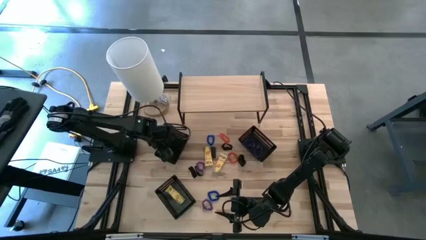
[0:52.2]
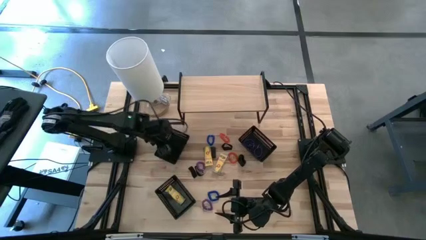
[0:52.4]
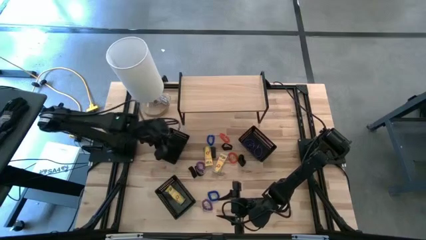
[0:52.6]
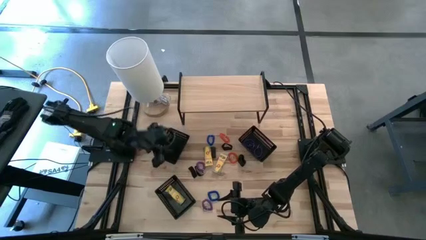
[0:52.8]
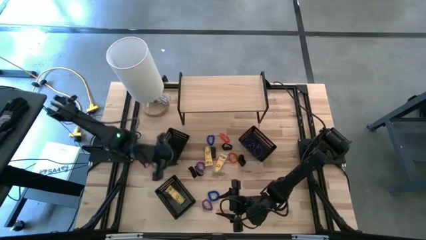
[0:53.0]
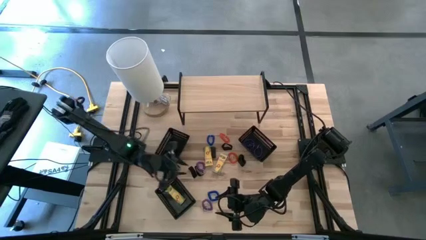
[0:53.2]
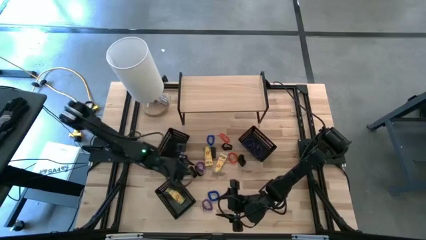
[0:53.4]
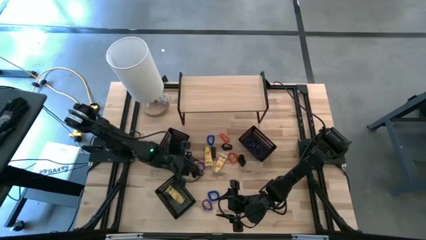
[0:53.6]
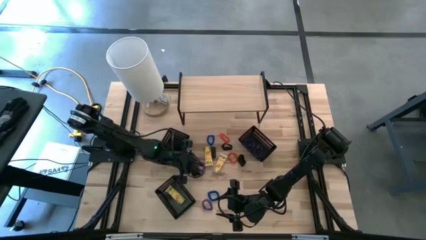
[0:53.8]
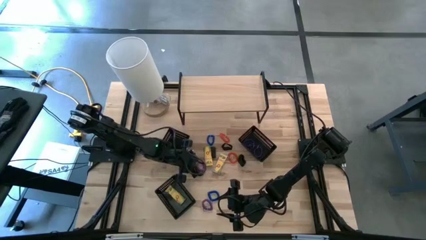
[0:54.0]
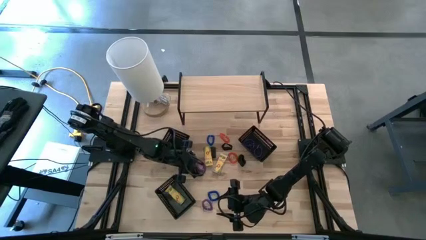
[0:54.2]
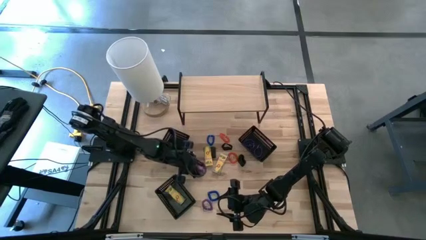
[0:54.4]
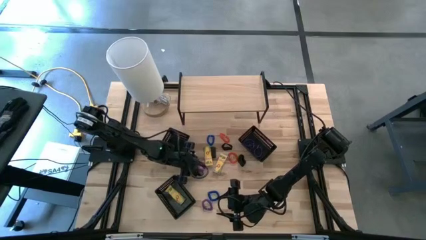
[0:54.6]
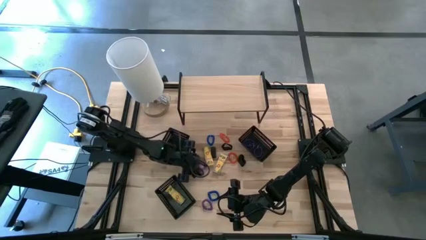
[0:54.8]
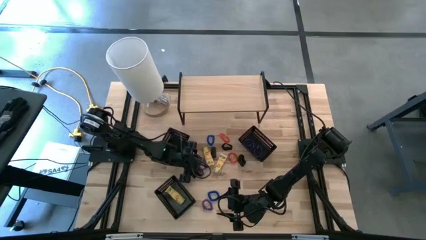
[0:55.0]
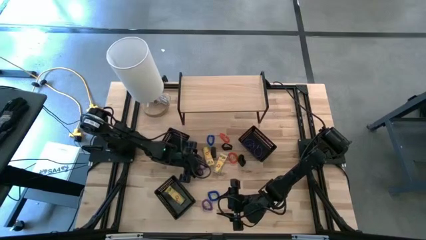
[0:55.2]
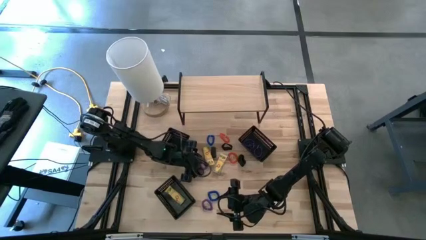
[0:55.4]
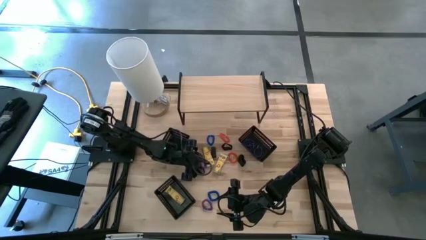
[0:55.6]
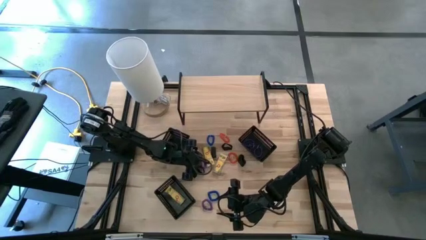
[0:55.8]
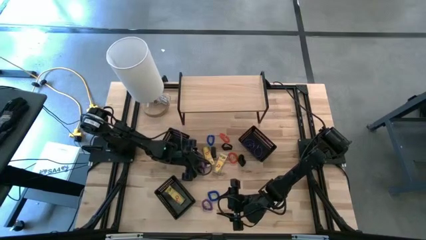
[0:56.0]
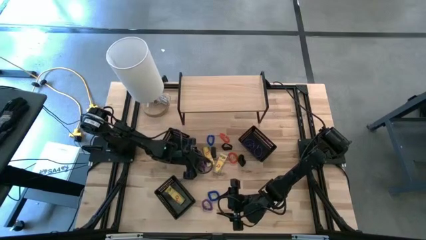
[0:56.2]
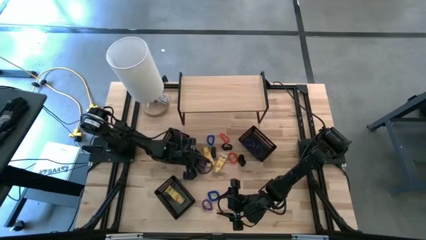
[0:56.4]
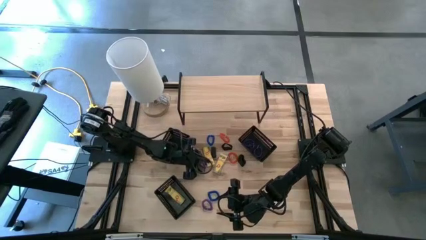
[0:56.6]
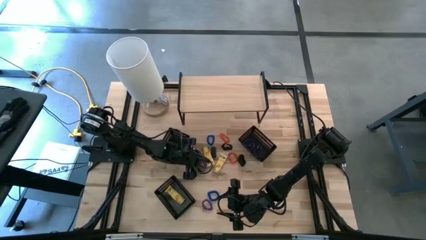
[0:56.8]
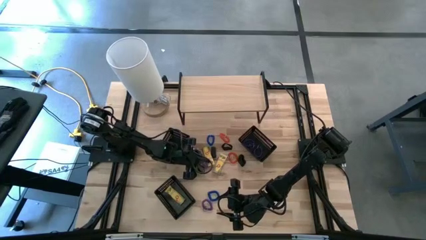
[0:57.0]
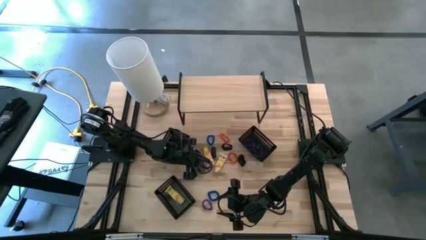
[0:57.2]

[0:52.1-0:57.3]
Task: Pick & Place Office Desk Supplies
Put the top purple spring keychain into the top right black bin

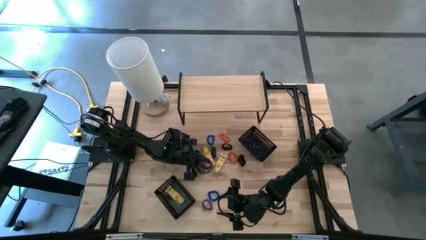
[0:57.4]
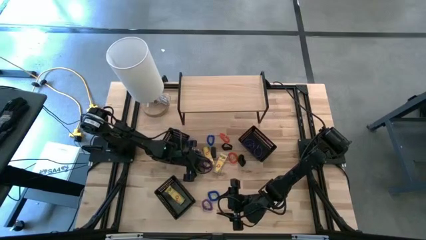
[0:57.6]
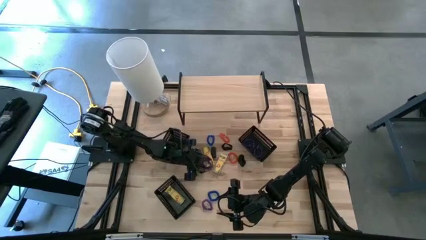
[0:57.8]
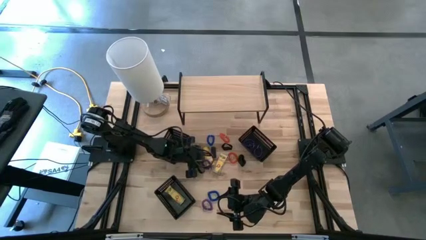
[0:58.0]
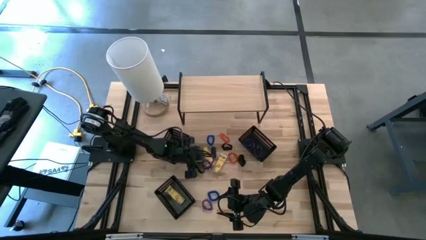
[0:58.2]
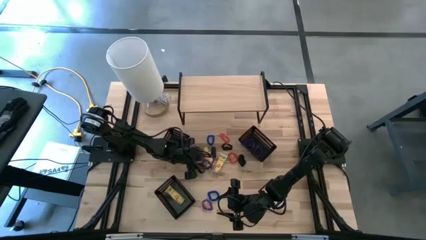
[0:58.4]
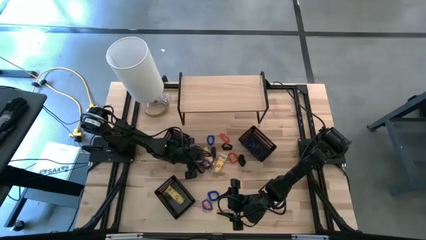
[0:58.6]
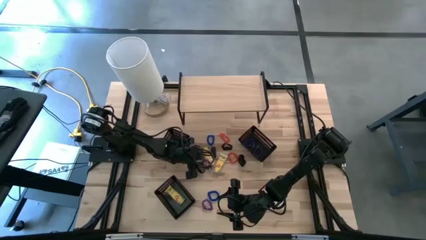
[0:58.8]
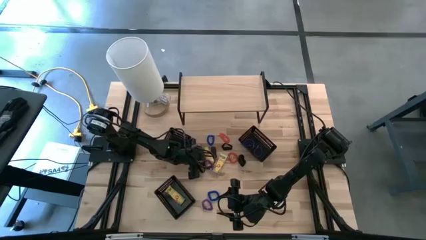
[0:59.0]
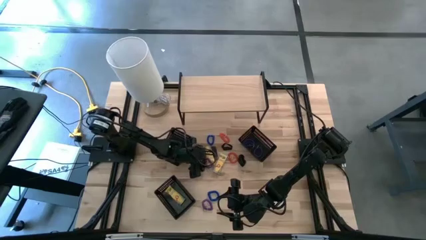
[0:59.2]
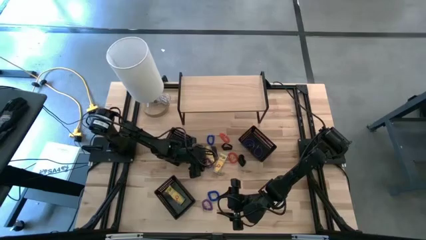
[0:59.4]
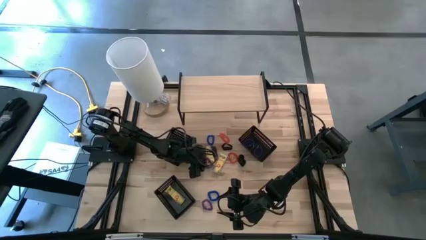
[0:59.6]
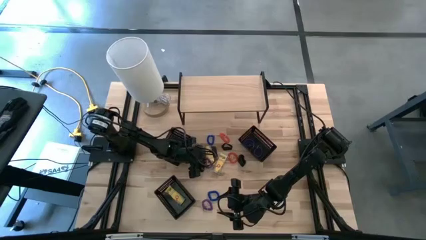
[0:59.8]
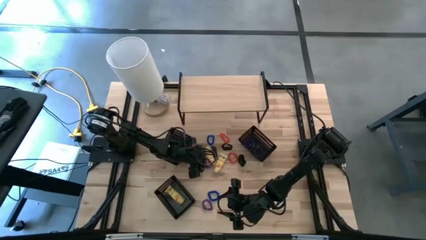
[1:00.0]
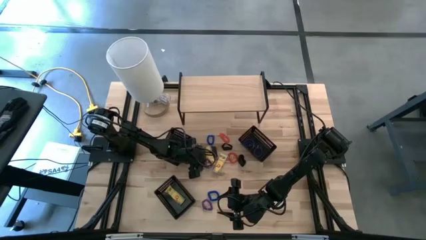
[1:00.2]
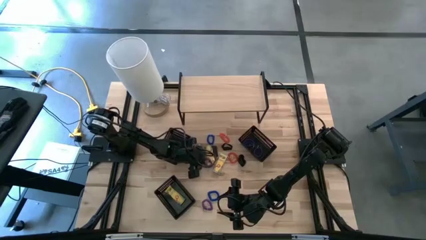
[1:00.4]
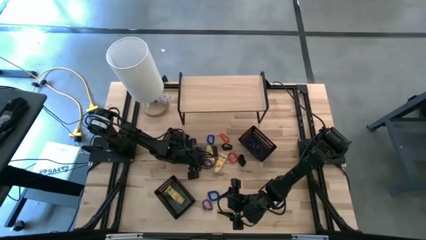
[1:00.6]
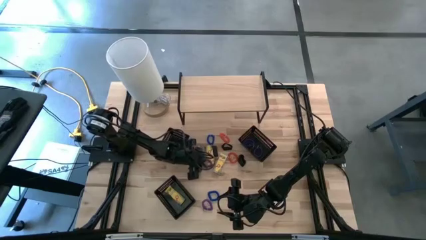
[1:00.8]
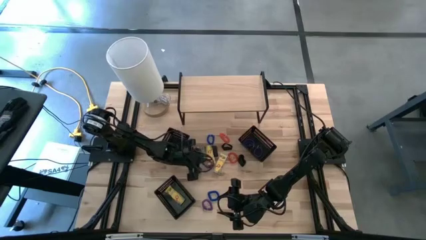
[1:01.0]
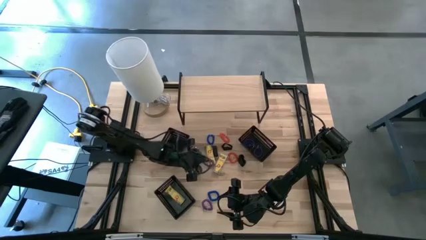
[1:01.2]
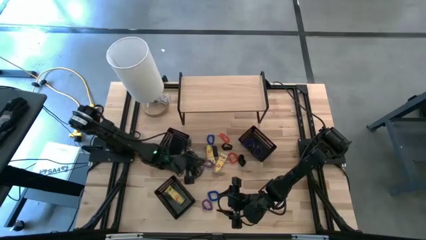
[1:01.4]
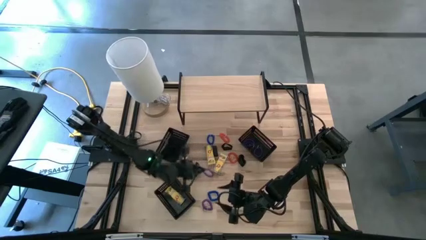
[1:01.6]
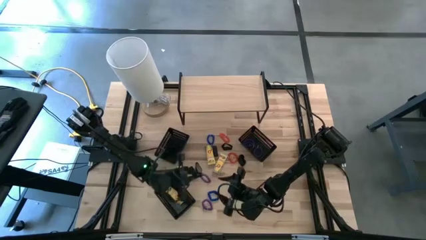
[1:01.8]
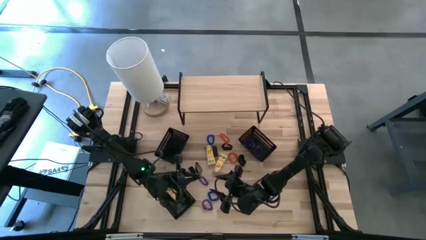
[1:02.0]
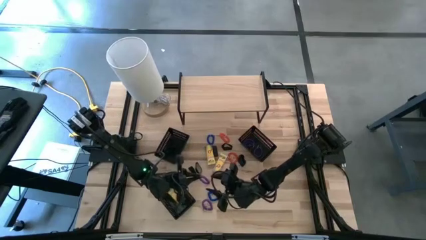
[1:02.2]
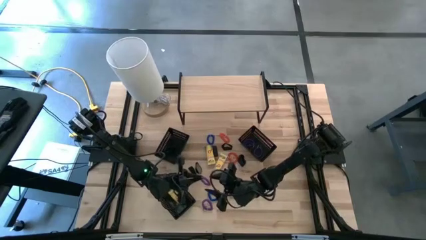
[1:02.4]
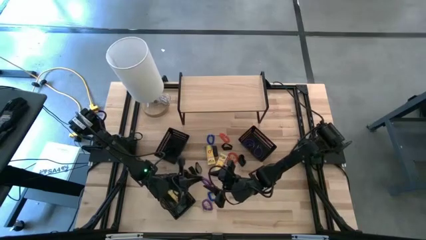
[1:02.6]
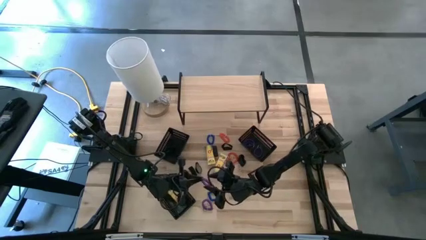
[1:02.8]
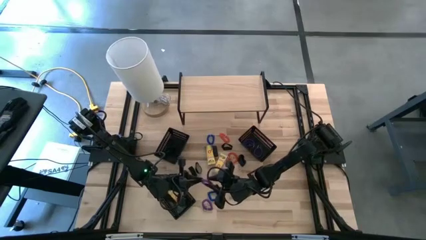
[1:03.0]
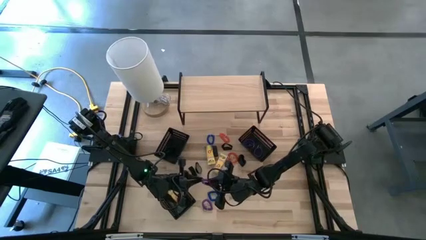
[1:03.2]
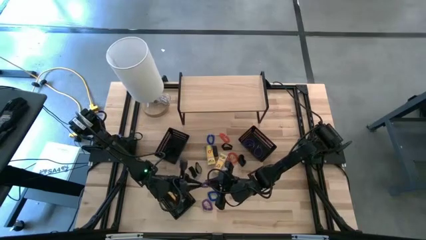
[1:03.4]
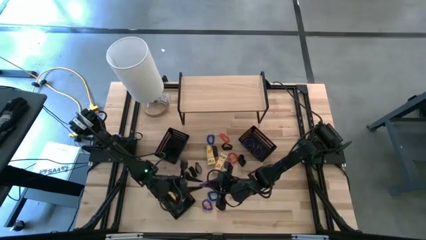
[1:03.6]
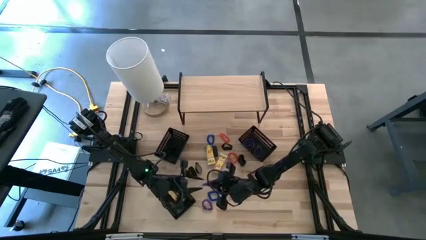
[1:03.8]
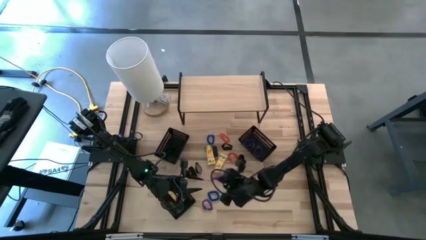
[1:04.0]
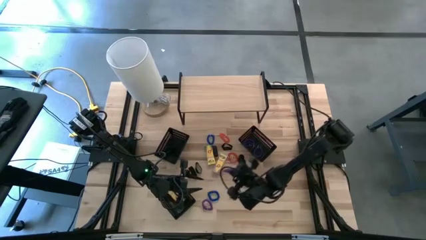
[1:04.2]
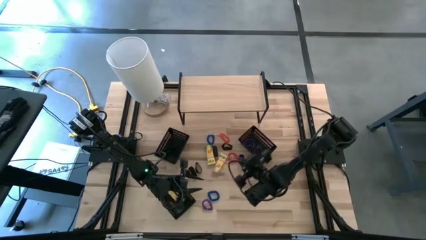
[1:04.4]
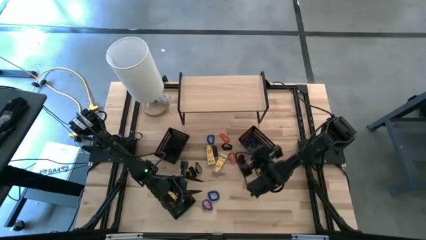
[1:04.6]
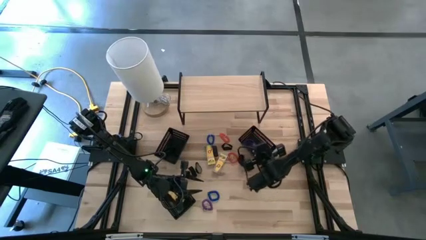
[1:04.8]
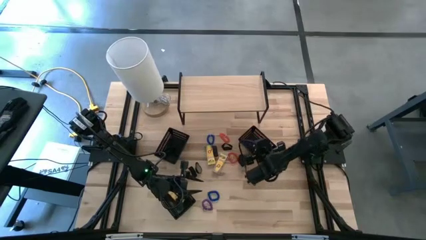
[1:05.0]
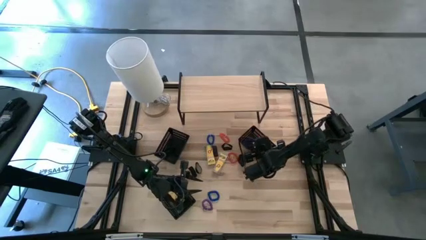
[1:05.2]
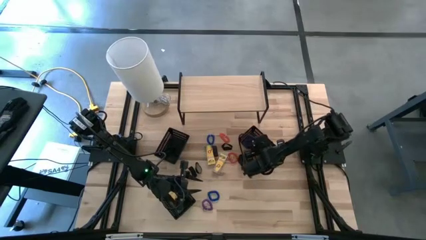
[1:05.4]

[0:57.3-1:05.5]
Put the top purple spring keychain into the top right black bin
